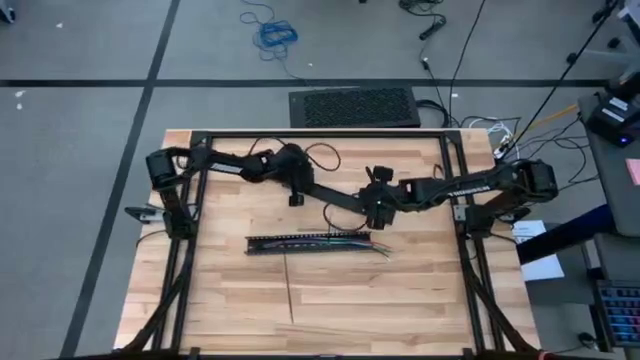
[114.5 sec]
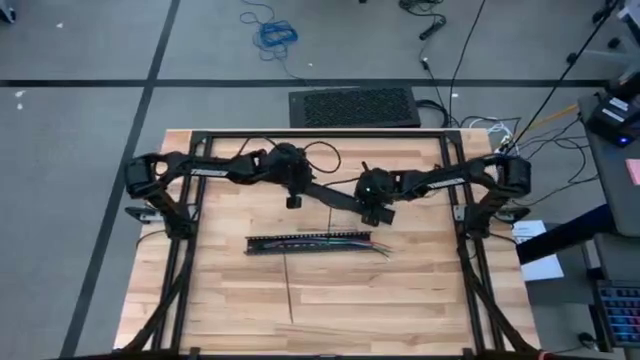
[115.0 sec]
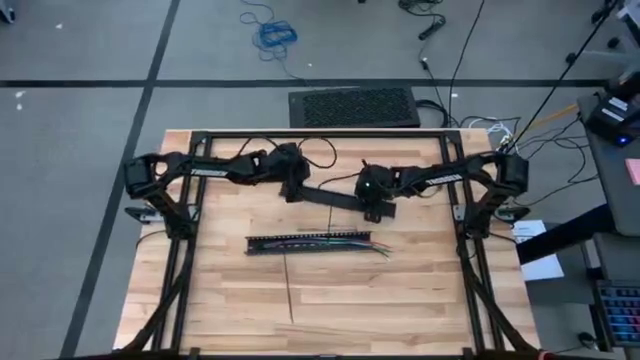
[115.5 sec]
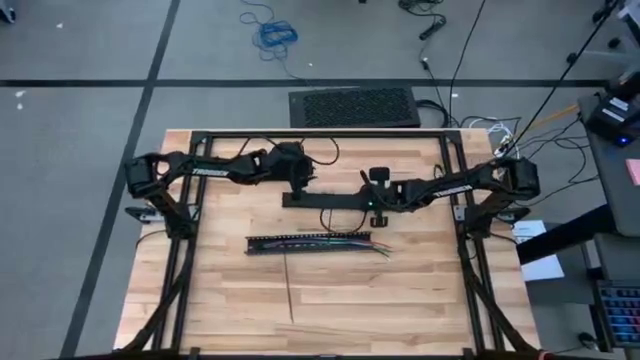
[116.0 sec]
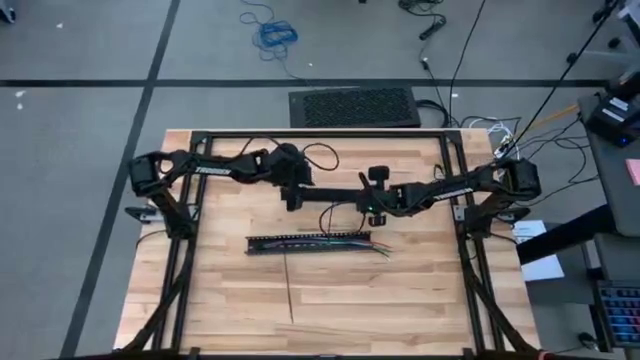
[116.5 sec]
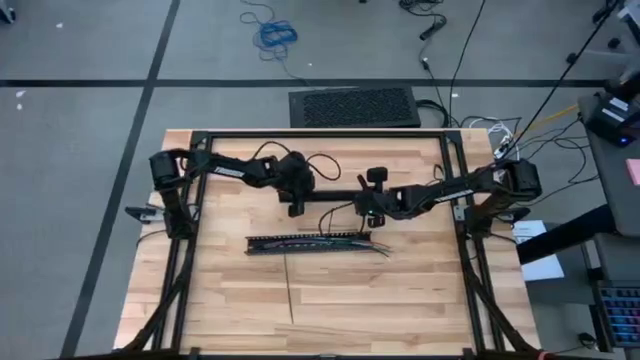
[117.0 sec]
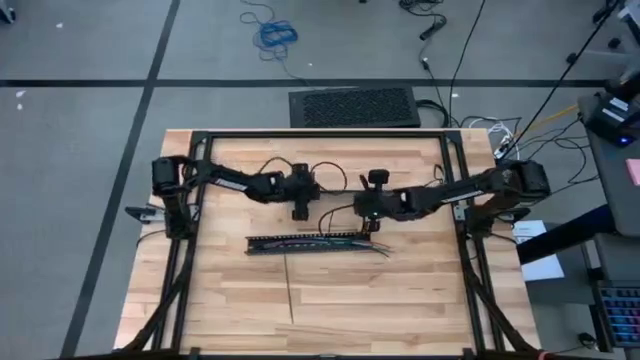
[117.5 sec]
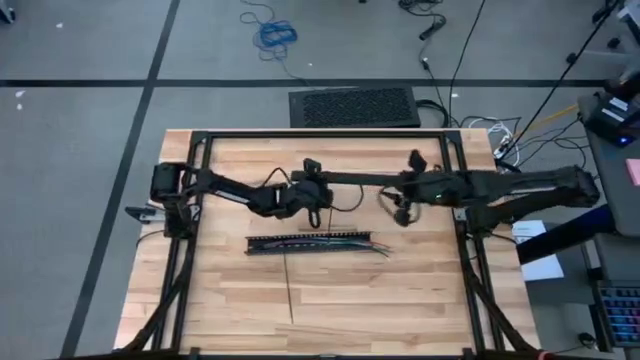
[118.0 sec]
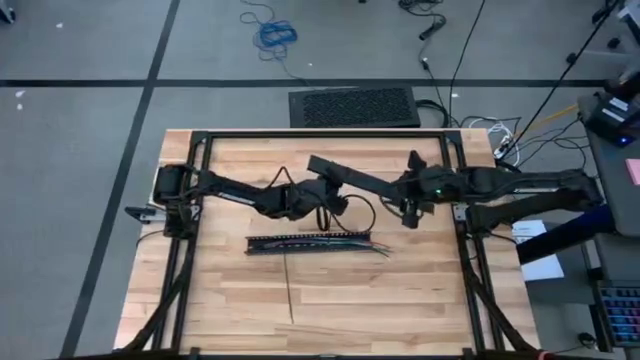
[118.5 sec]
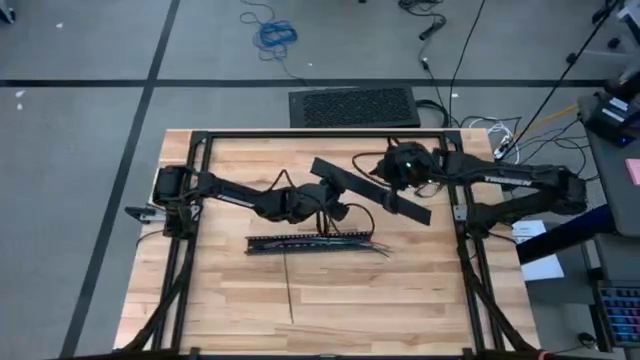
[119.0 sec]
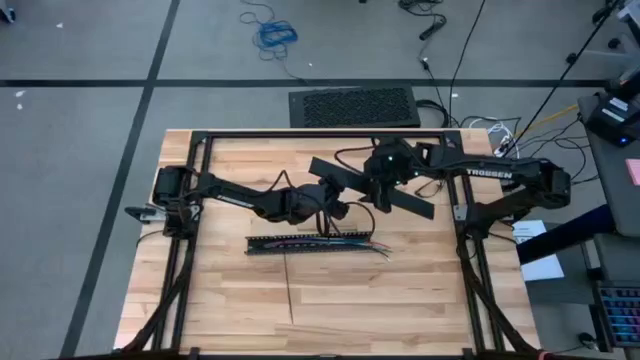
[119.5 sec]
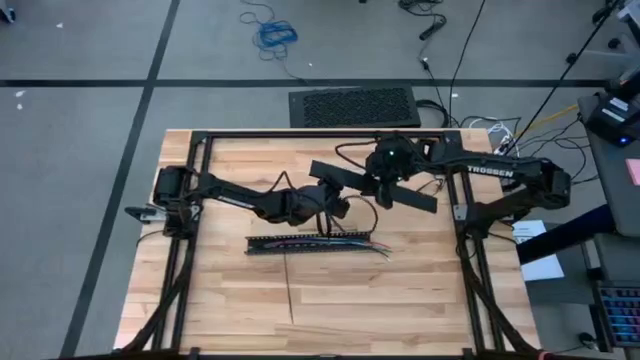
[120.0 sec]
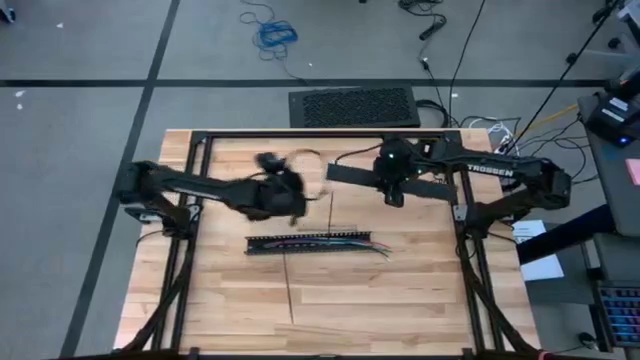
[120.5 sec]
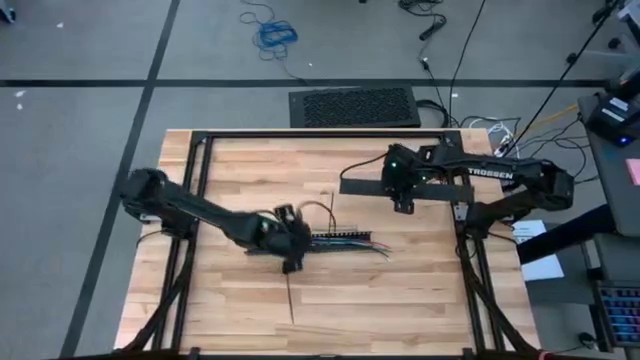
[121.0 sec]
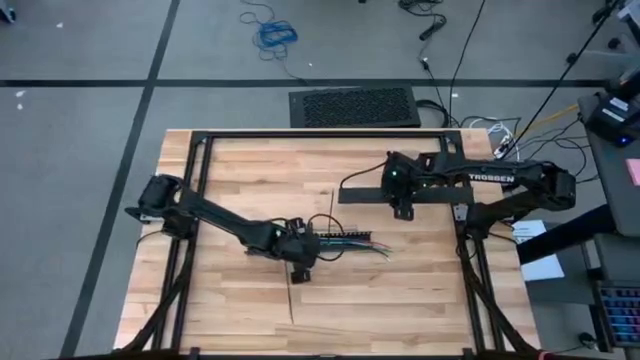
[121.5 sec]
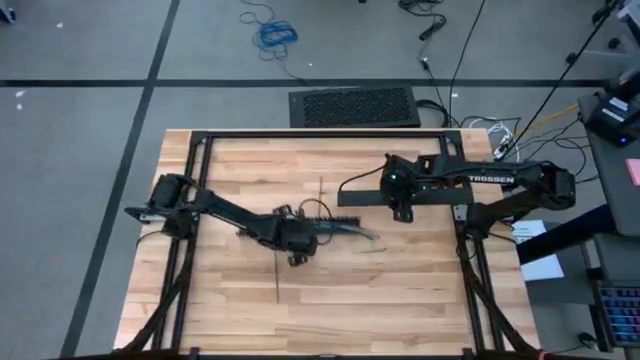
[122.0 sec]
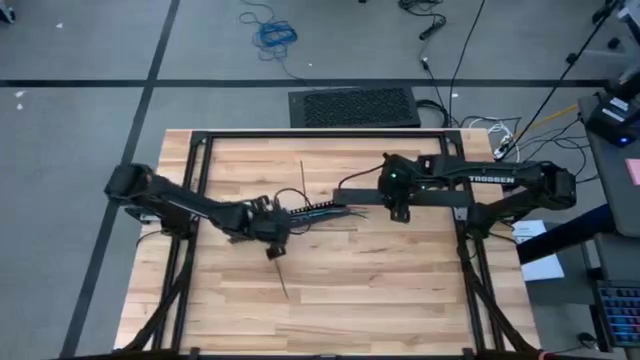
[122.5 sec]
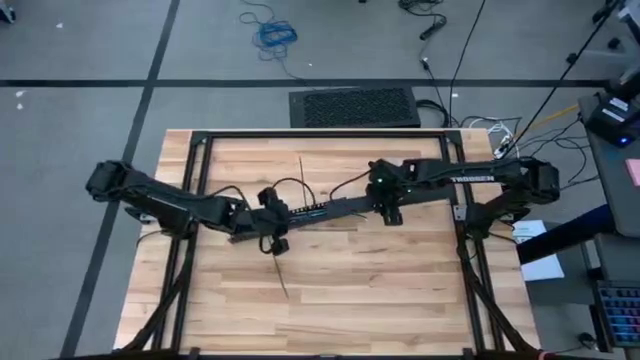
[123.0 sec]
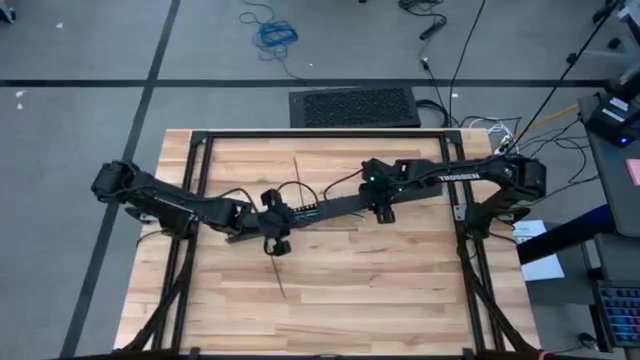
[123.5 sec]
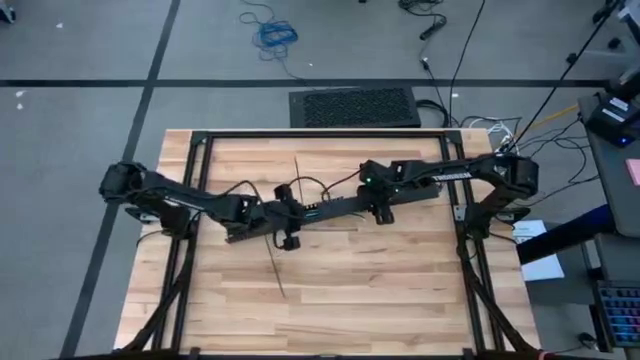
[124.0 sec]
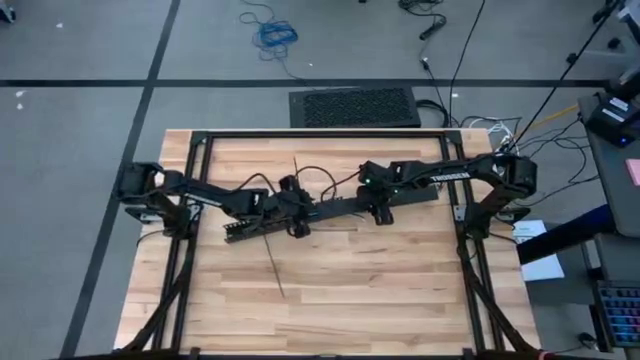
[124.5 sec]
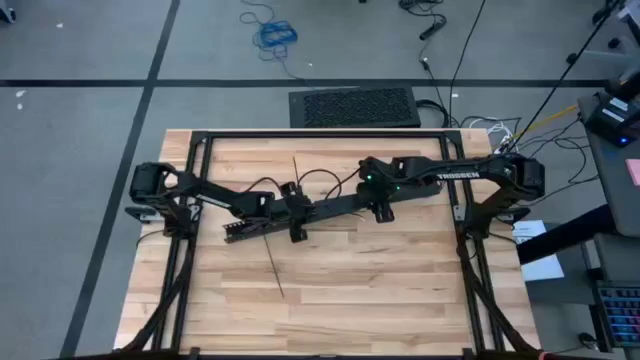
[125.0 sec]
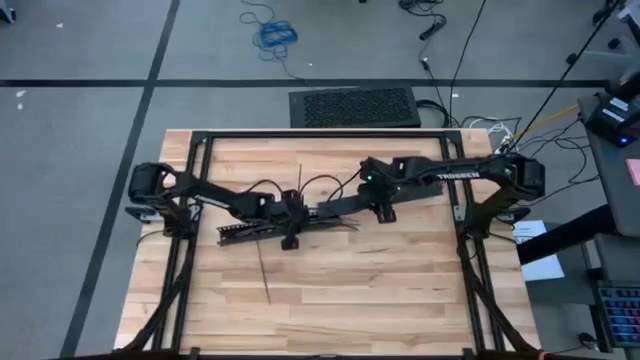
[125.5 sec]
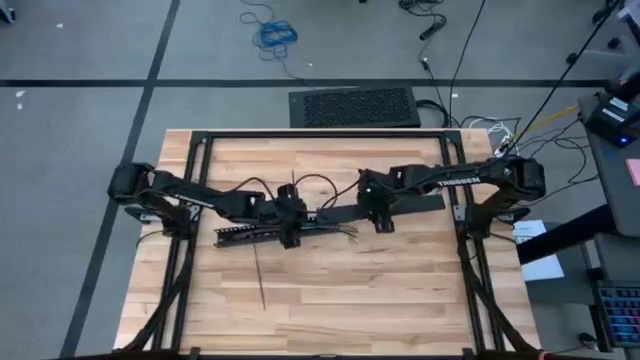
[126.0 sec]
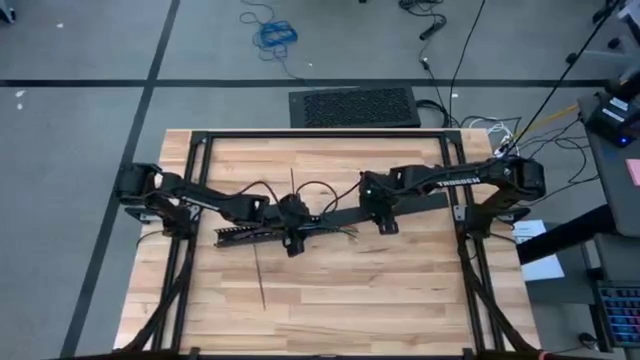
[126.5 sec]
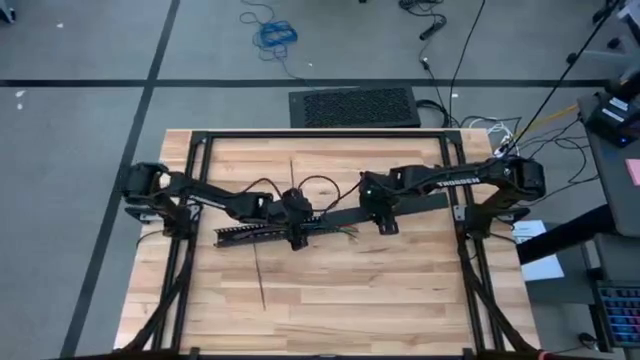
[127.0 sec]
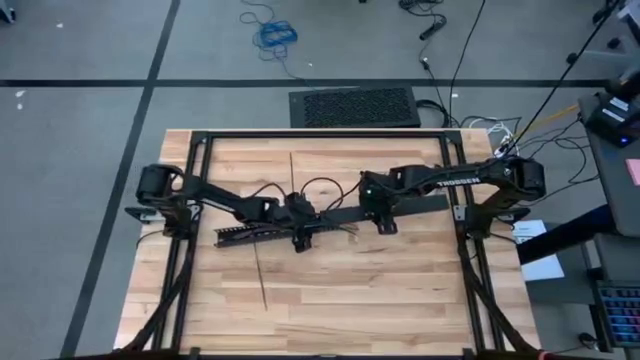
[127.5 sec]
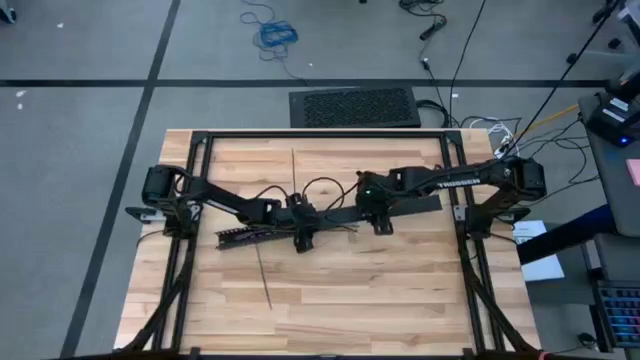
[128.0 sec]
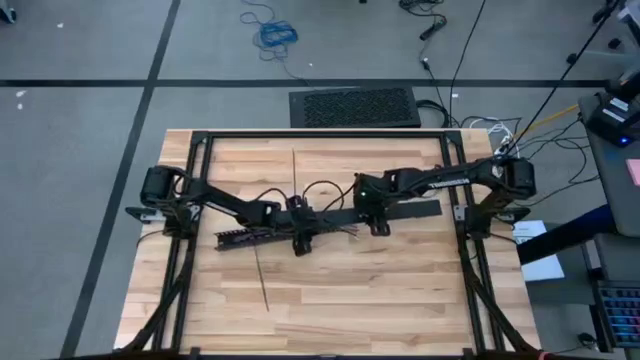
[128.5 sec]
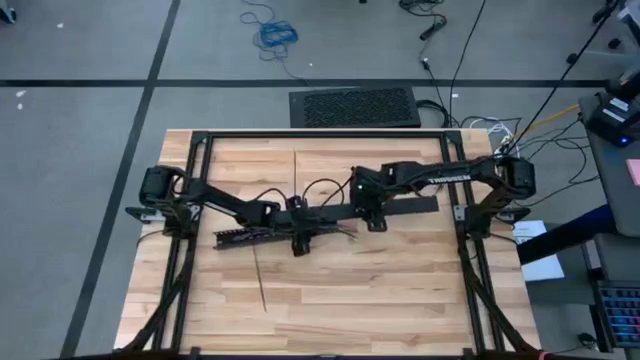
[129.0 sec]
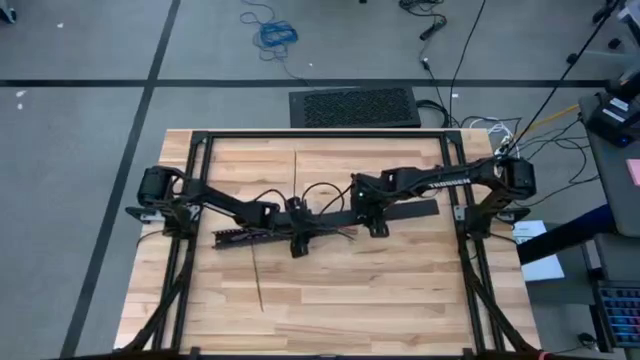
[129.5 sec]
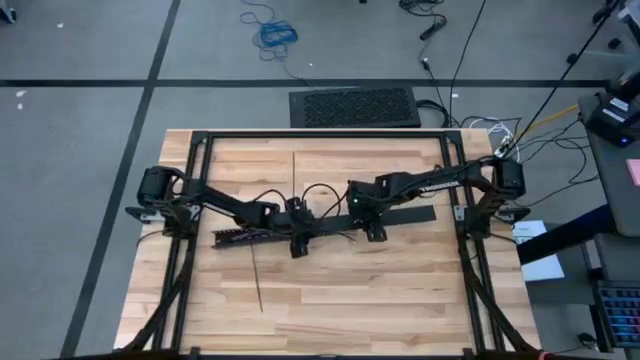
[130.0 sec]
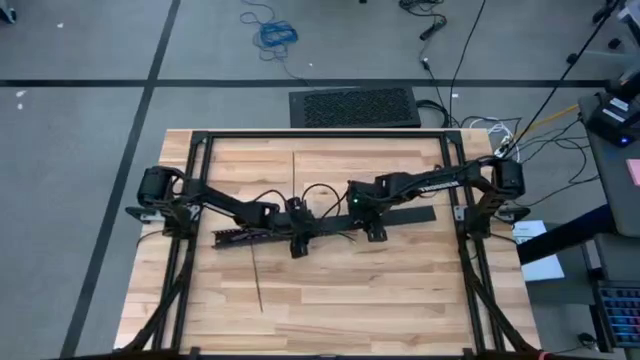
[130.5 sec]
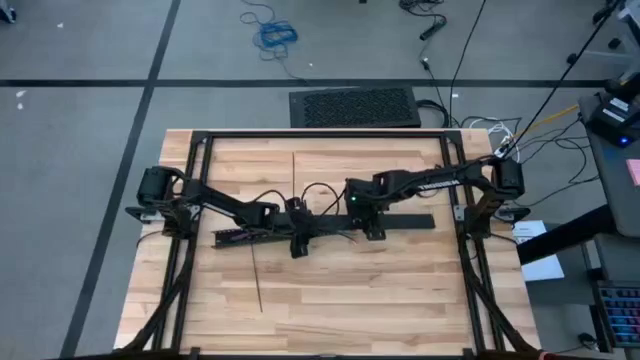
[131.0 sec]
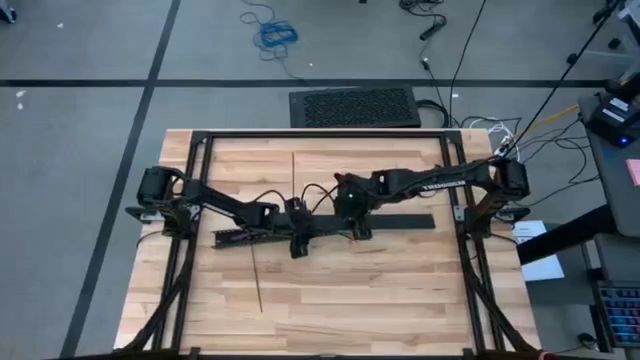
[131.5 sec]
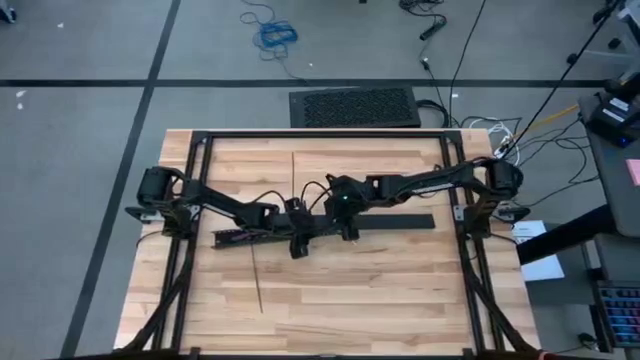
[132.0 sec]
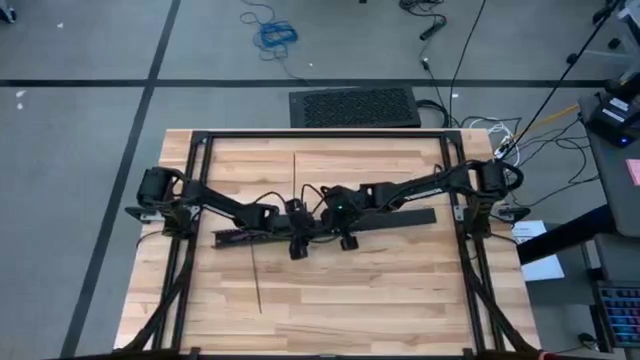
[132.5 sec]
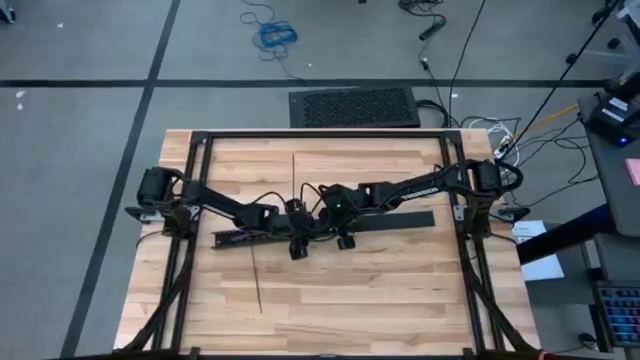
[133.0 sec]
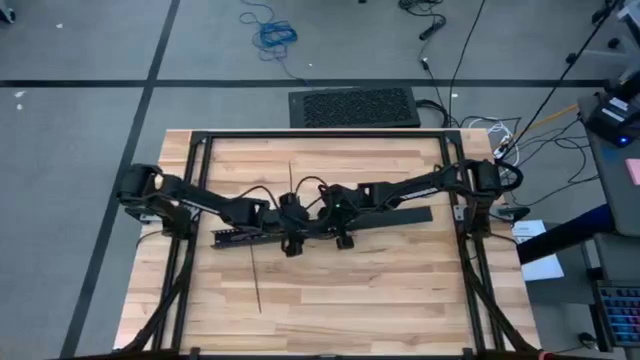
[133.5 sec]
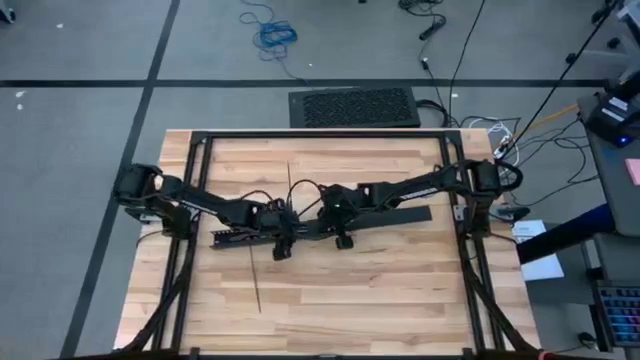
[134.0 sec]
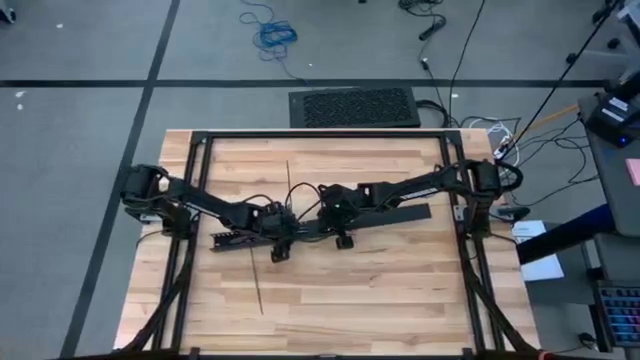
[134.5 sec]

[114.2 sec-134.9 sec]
Task: Ziptie cables
Insert the black cable duct cover into the black cable duct

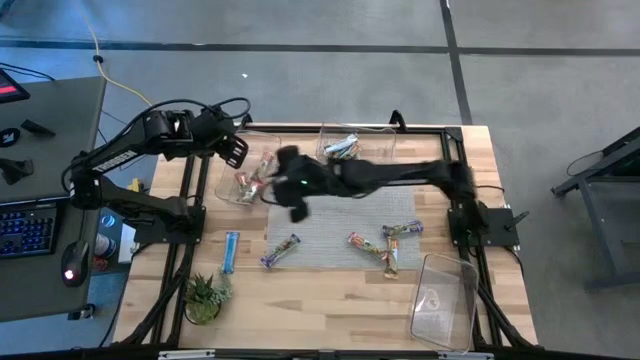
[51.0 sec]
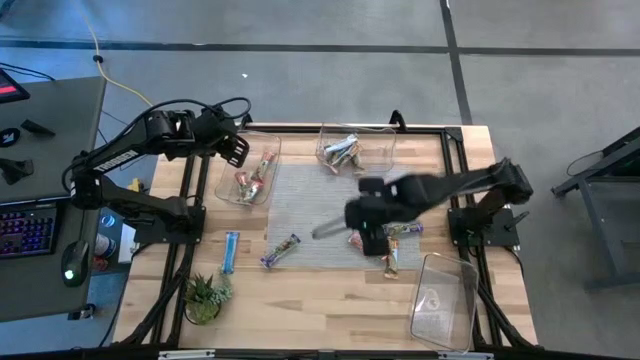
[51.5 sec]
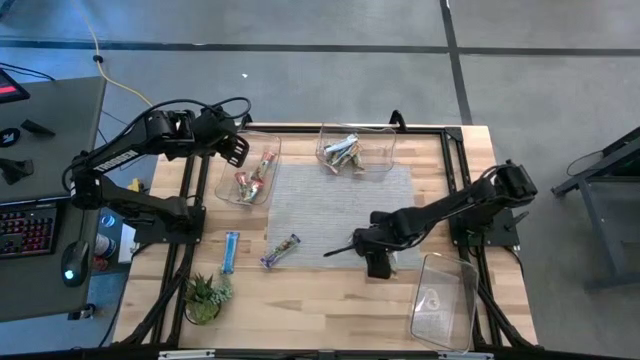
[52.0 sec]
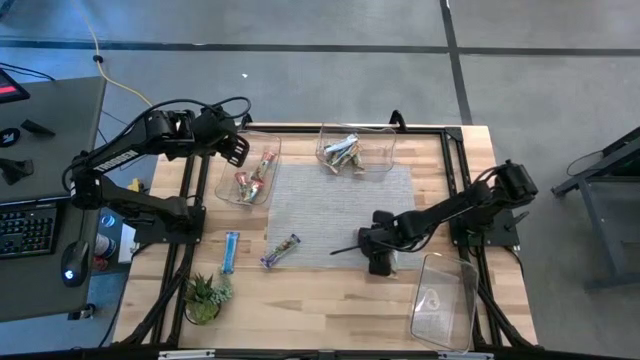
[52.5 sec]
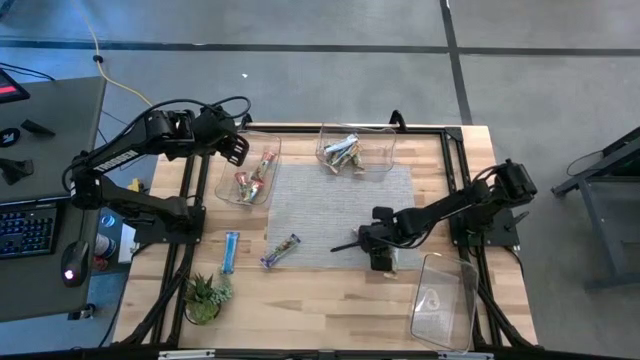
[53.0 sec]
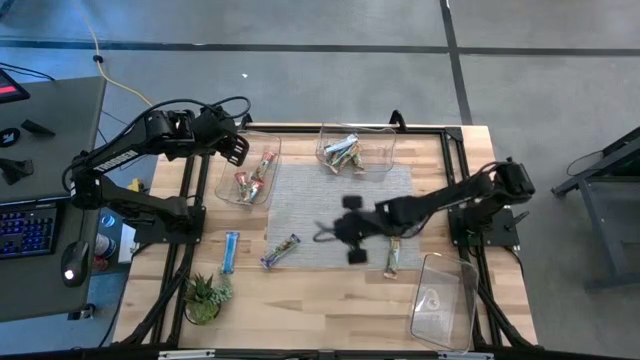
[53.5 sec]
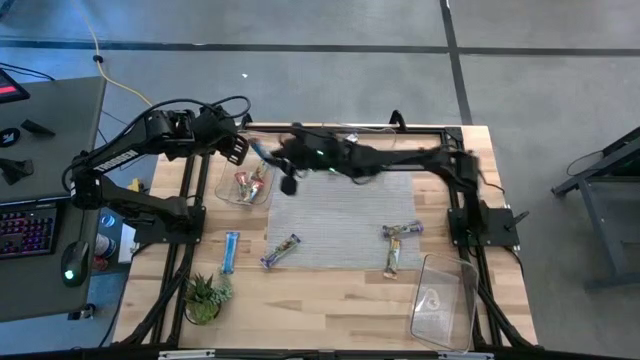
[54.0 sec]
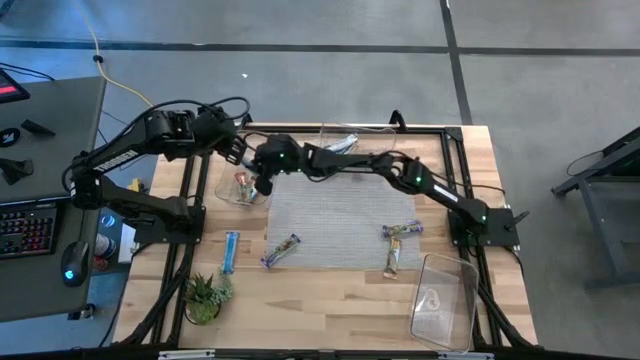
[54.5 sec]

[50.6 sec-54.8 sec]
Task: Pick and place Granola Bars by type
Put the red granola bar into the top left transparent bin
